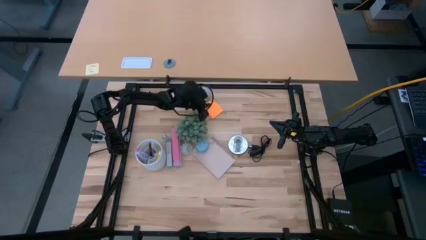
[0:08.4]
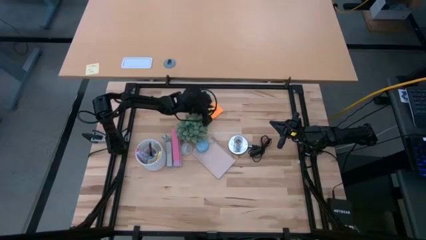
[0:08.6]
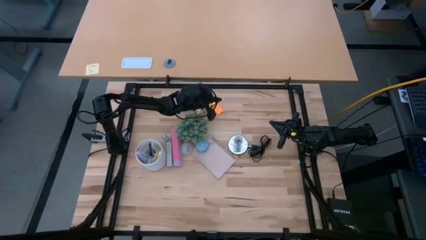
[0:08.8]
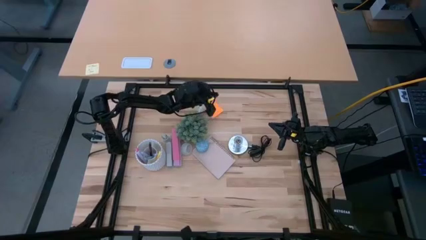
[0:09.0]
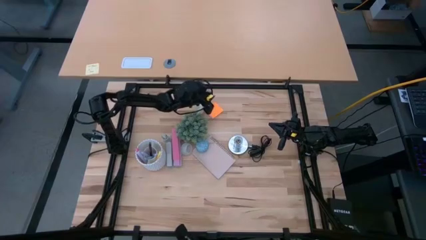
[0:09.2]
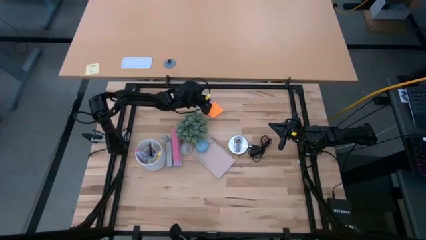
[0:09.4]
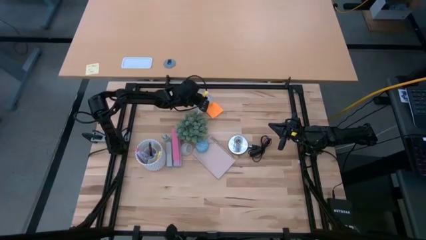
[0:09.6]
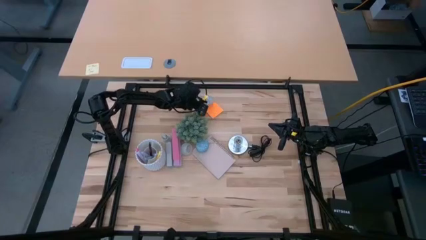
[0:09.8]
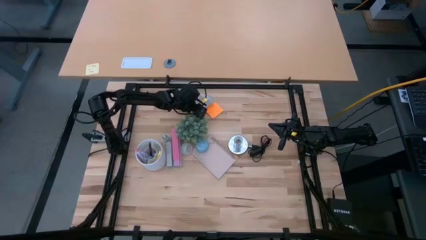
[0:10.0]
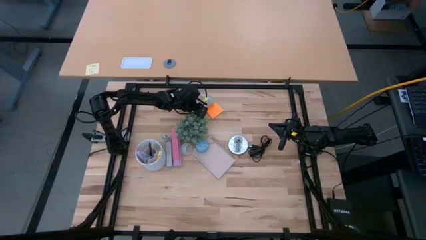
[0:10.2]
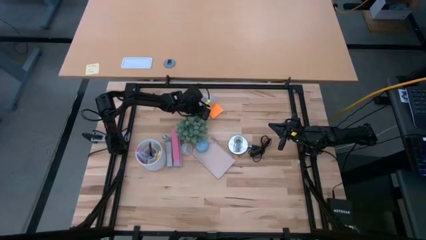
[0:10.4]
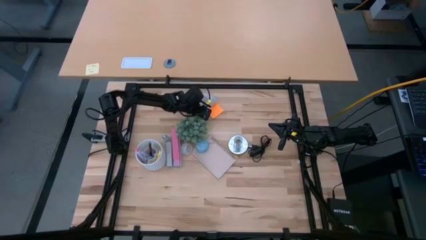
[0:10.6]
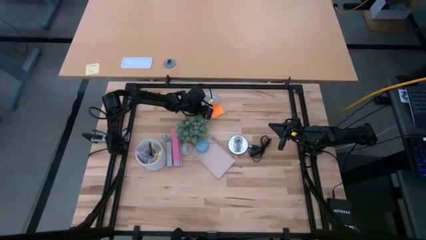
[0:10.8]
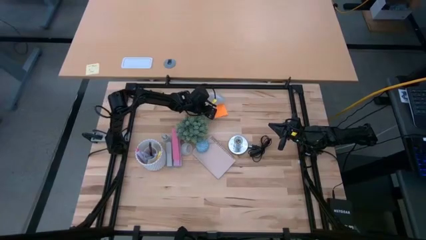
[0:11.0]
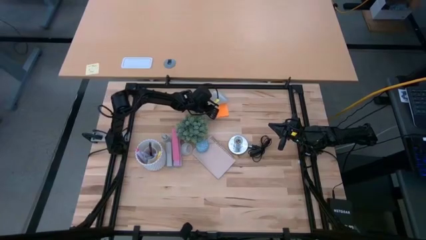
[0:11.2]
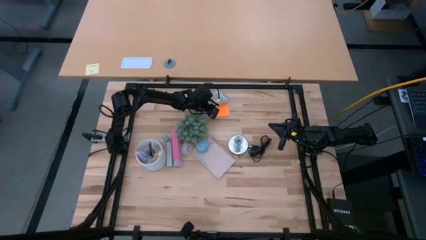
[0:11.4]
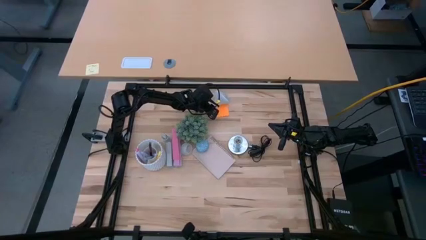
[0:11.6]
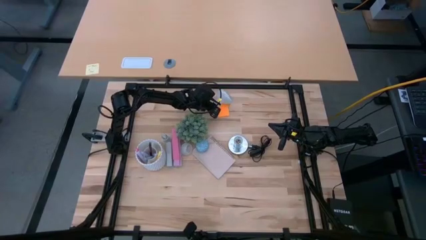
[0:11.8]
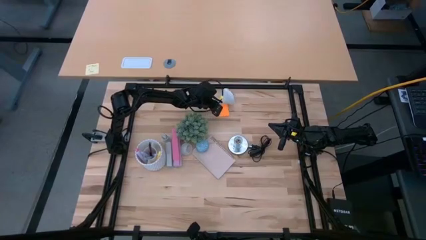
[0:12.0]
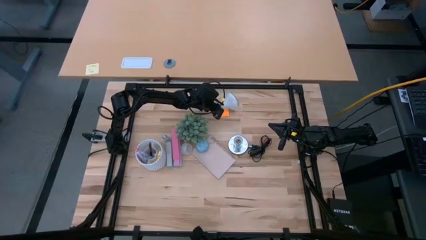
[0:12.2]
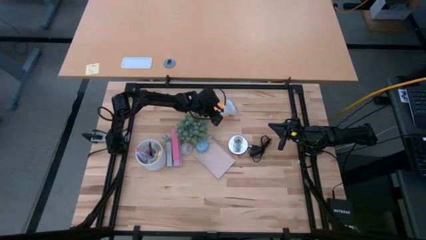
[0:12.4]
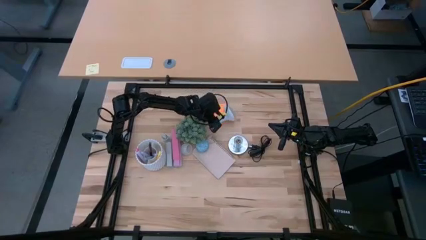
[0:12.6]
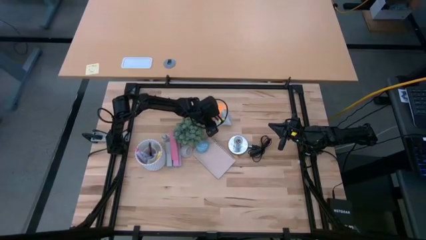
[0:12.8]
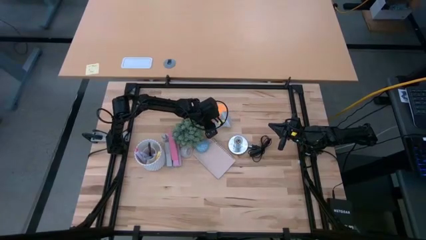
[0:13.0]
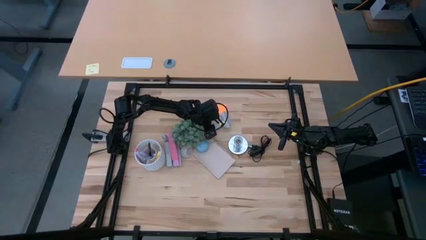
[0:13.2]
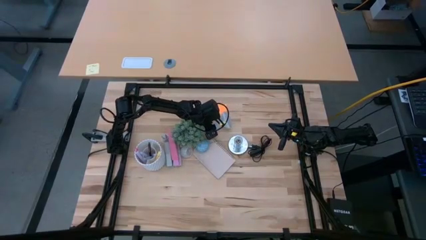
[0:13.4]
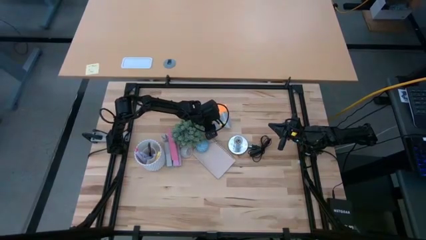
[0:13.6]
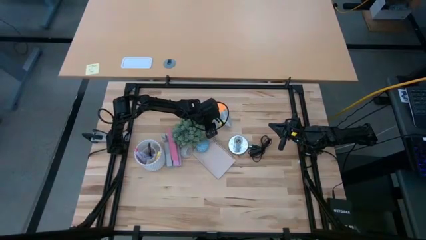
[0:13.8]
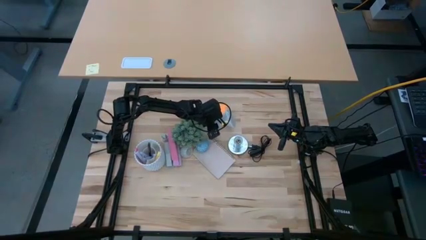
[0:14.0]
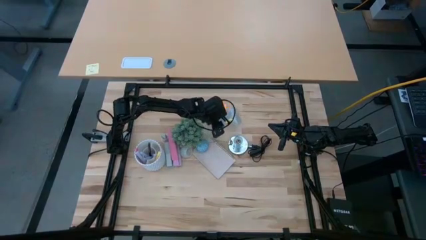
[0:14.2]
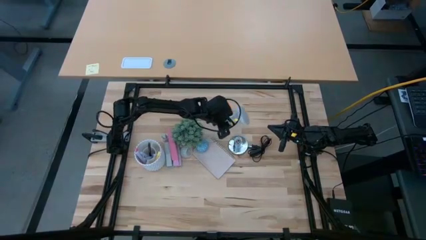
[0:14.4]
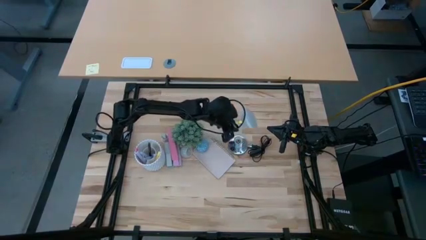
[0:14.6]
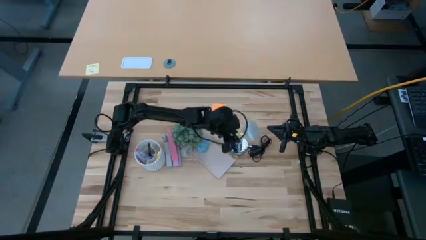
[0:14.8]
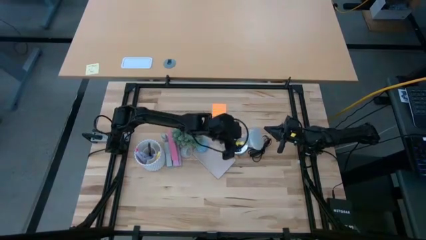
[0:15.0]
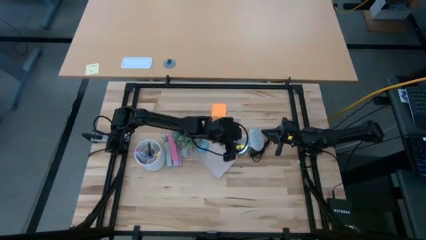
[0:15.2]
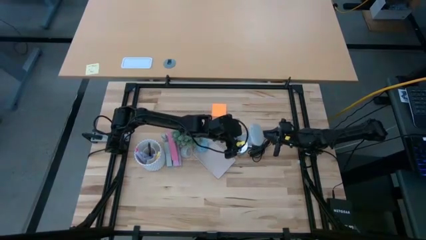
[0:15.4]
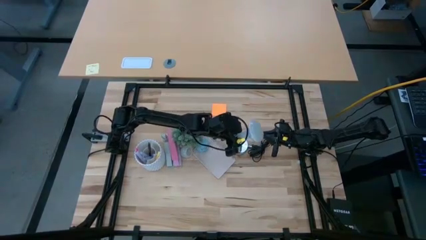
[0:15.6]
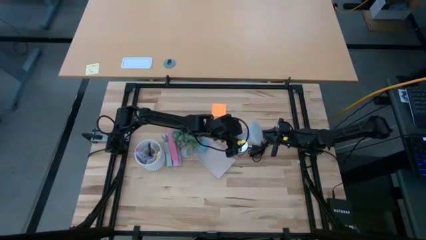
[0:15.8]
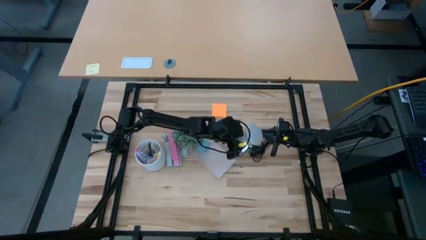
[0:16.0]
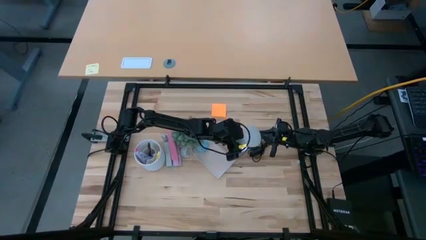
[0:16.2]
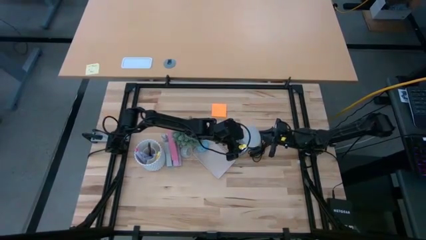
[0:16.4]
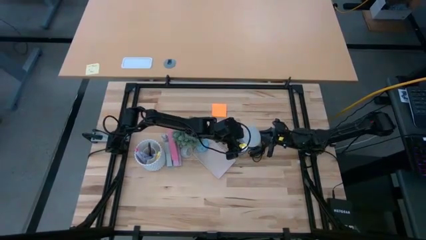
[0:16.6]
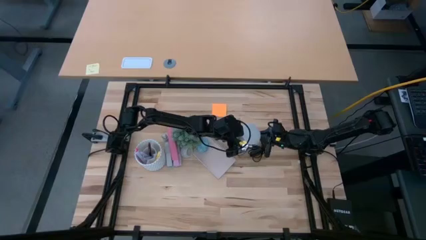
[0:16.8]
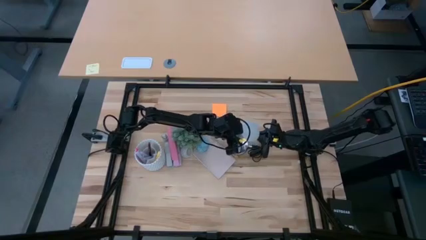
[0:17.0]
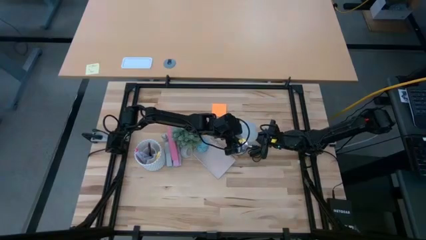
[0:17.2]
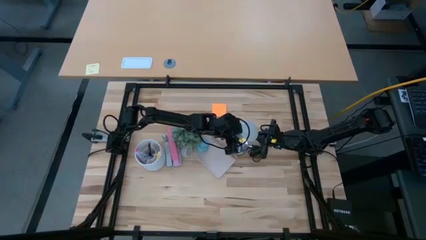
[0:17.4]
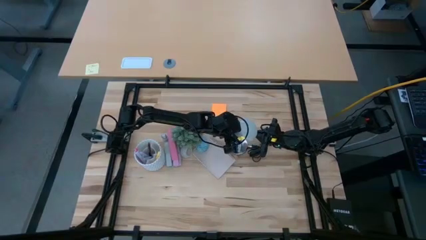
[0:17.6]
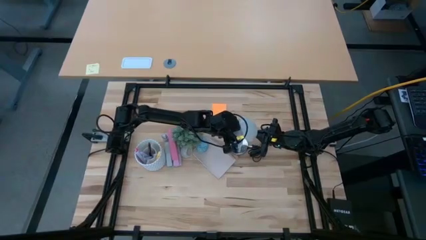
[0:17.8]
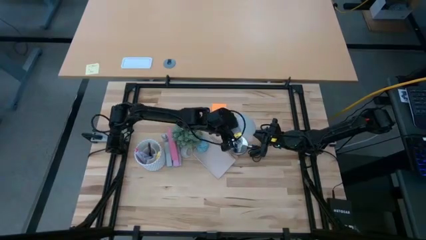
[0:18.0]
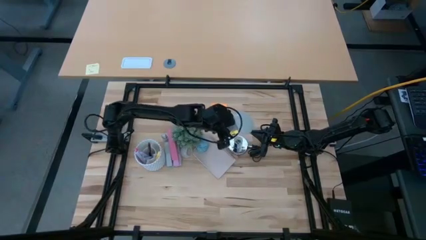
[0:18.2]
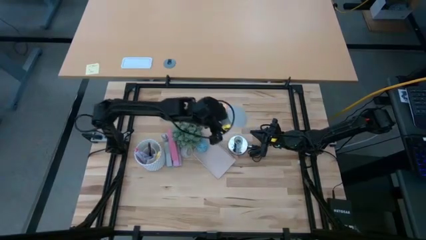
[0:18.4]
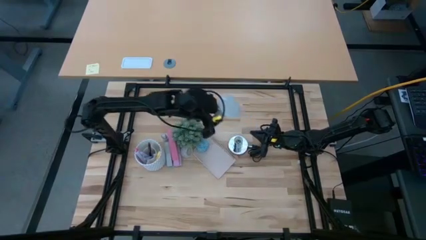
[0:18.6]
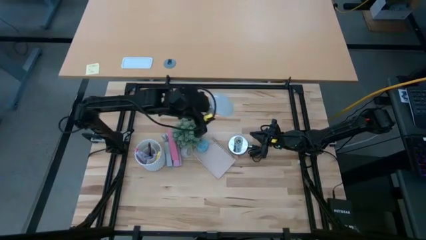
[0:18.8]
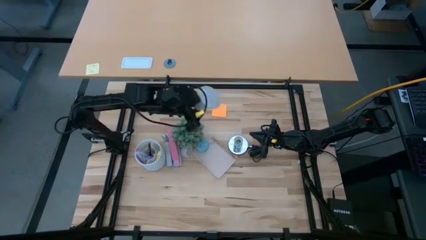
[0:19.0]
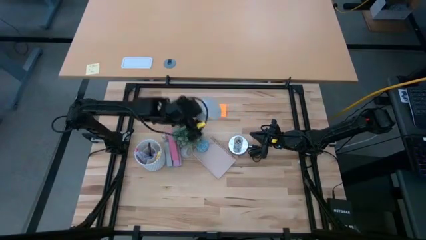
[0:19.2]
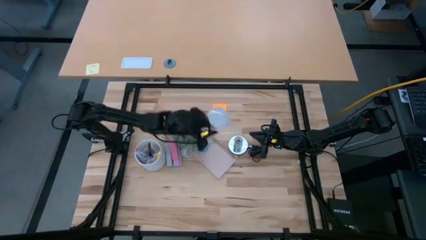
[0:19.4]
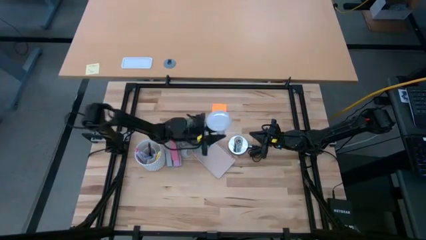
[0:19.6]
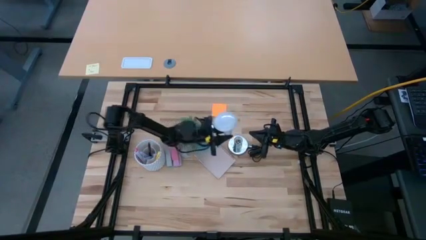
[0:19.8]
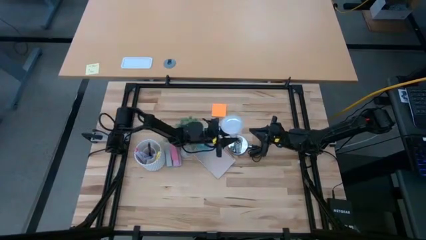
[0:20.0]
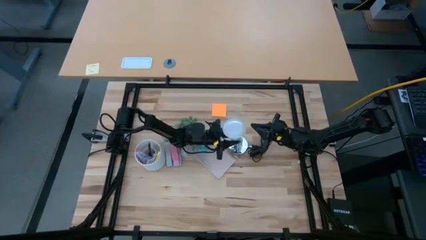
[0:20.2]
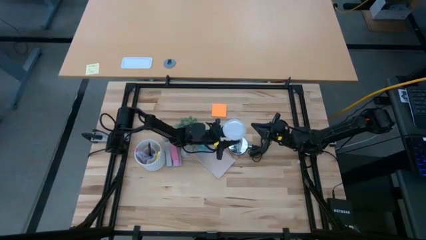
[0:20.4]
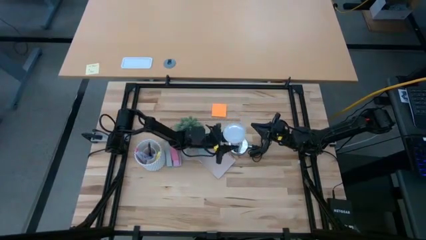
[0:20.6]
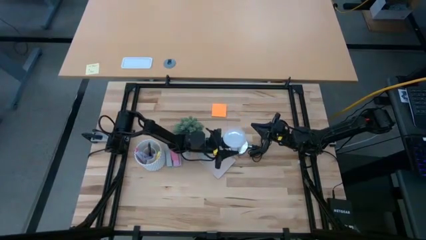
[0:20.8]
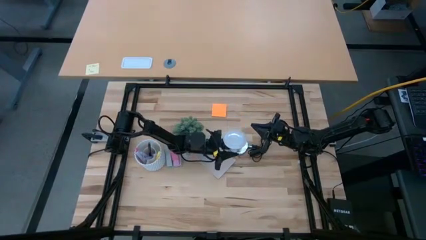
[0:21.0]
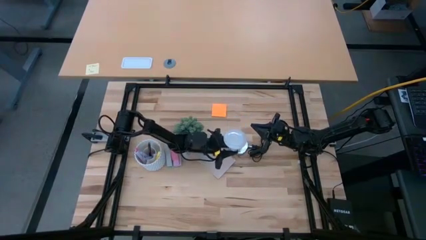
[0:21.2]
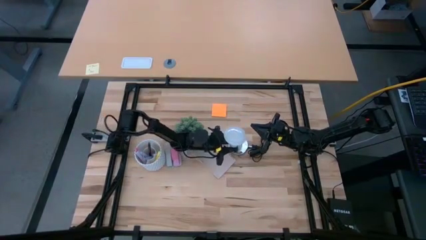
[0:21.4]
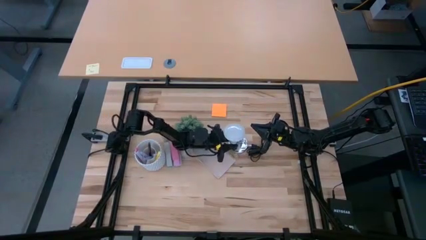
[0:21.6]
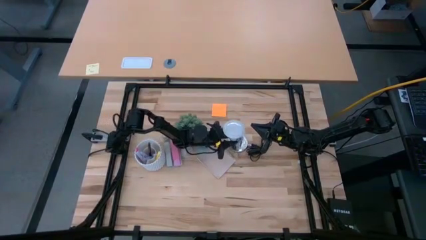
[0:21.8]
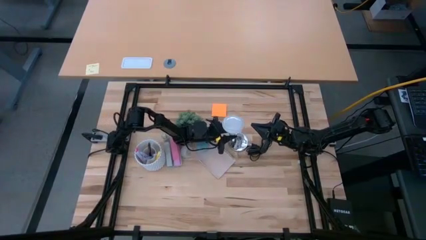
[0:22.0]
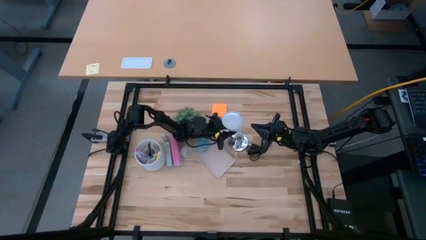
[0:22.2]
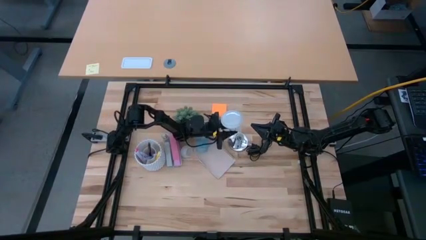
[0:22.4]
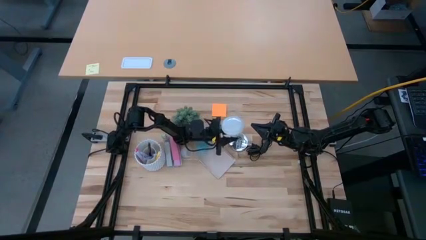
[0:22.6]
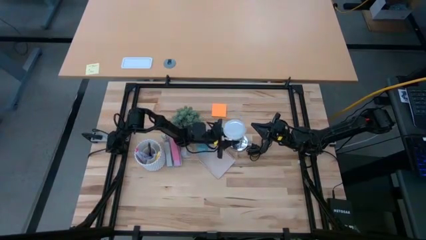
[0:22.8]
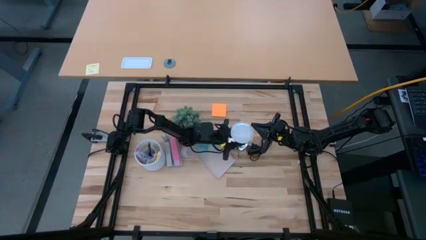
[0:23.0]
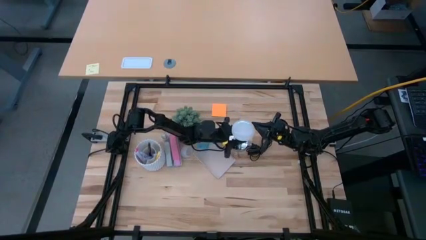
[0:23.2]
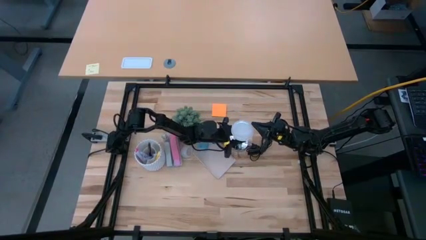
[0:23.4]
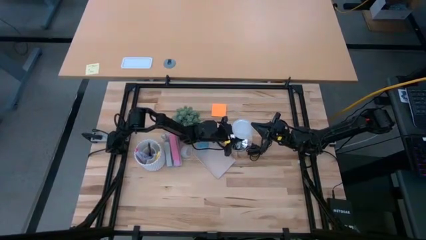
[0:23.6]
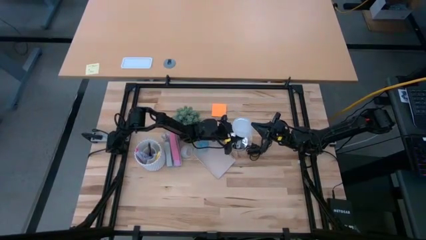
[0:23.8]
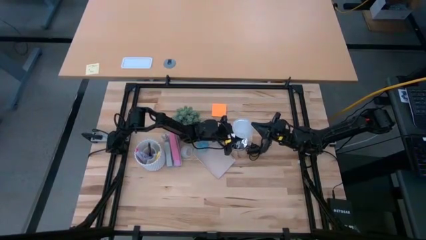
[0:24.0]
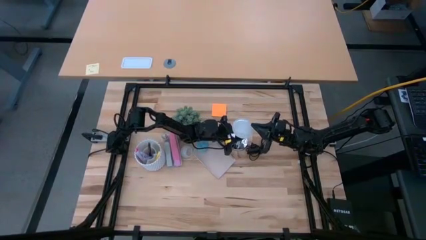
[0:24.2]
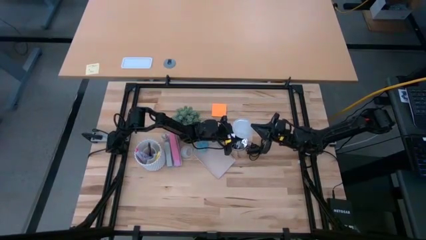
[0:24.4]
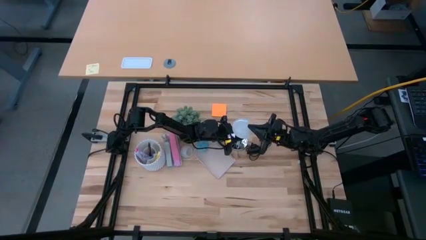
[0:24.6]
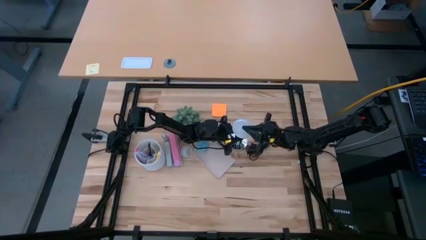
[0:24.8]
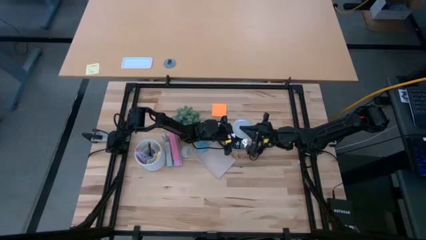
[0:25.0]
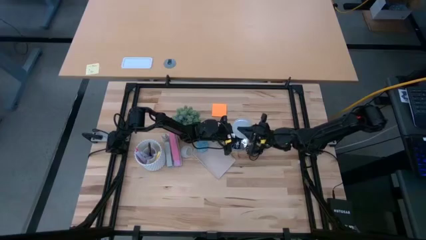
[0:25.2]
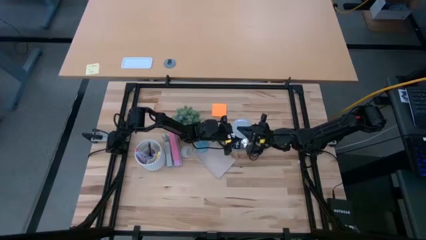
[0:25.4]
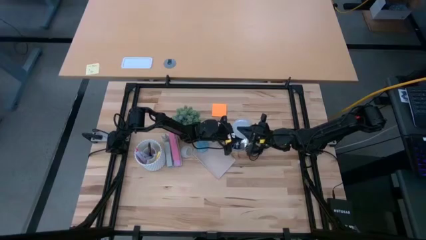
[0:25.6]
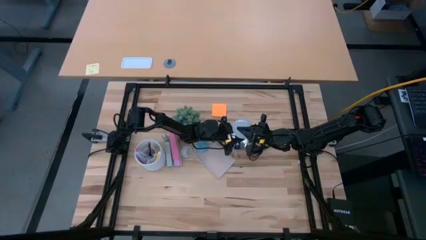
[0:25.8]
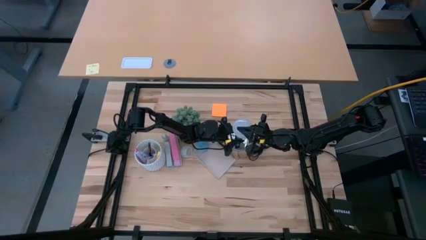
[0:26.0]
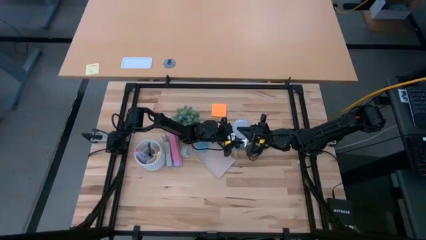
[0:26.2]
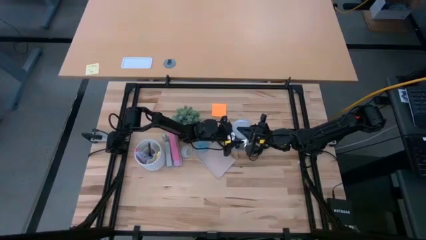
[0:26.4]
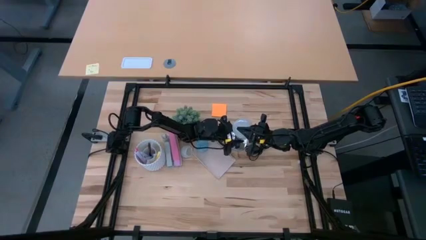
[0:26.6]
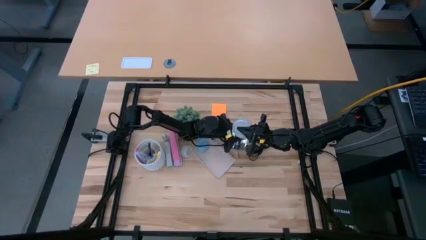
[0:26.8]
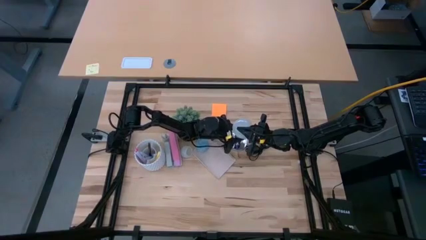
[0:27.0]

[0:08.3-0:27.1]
Task: Screw lightbulb
Insert the lightbulb into the silver lamp socket
